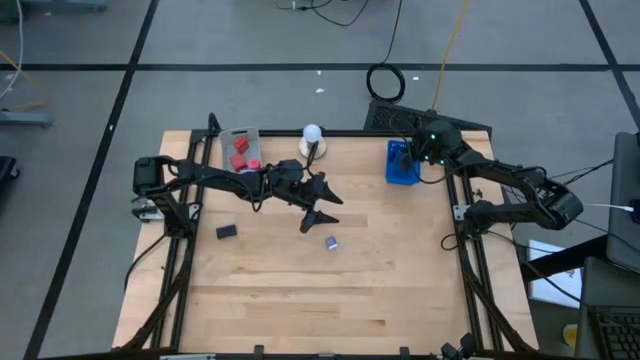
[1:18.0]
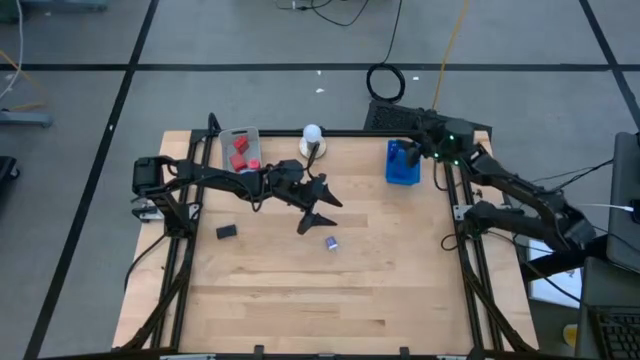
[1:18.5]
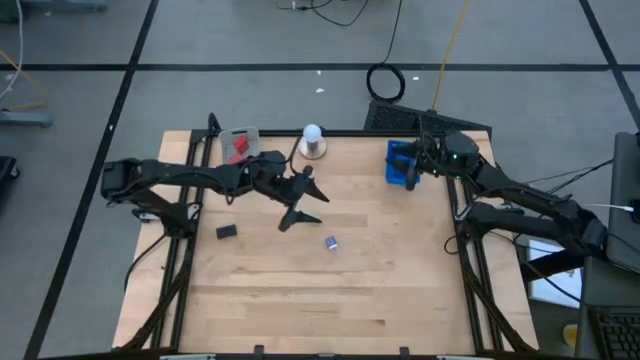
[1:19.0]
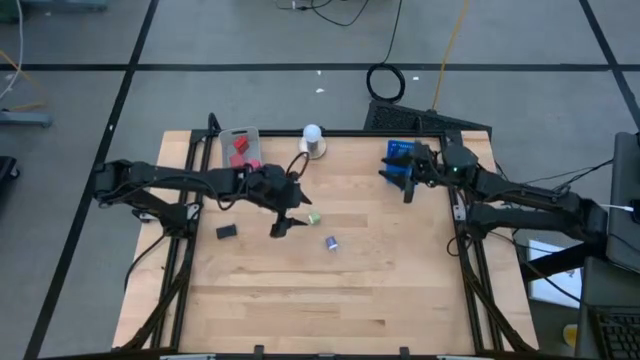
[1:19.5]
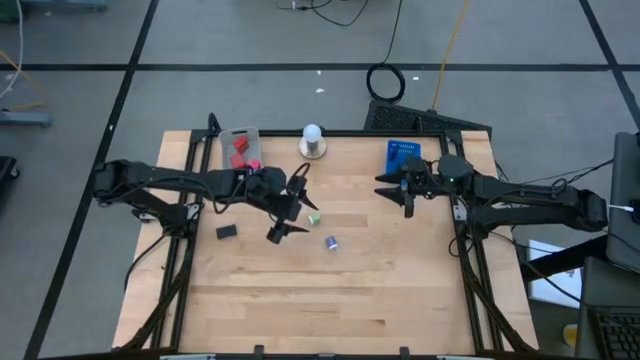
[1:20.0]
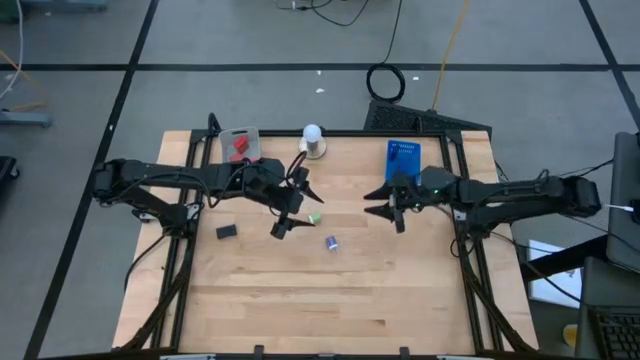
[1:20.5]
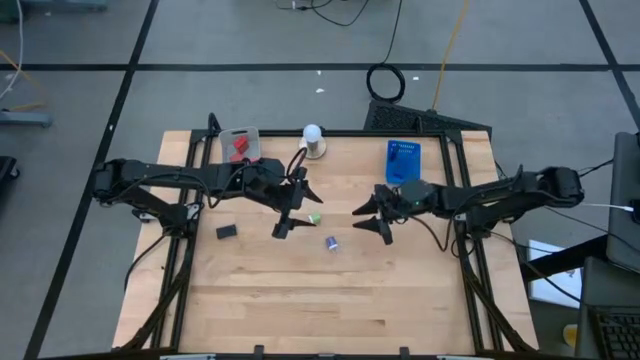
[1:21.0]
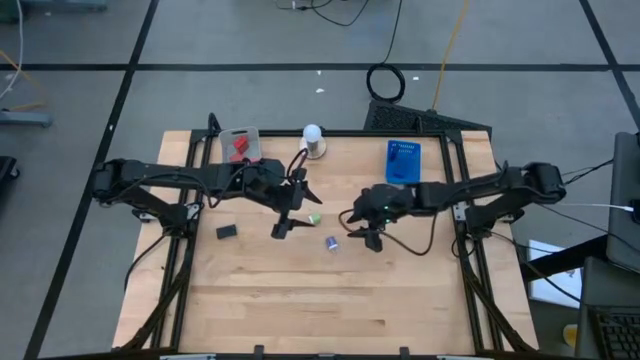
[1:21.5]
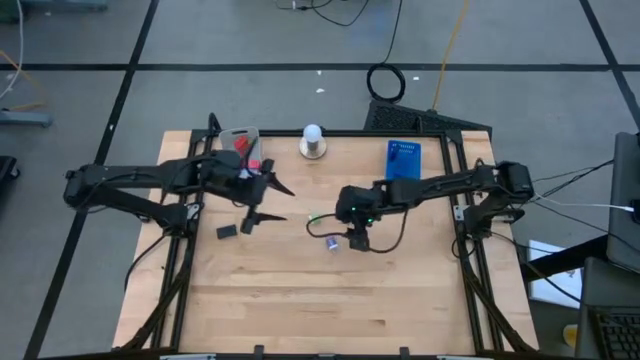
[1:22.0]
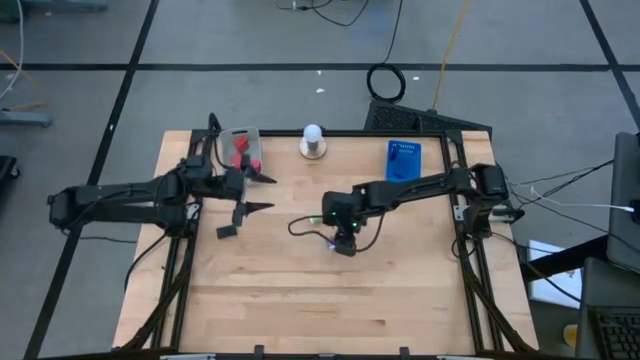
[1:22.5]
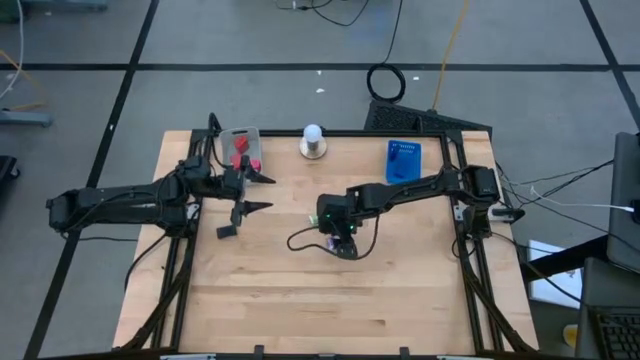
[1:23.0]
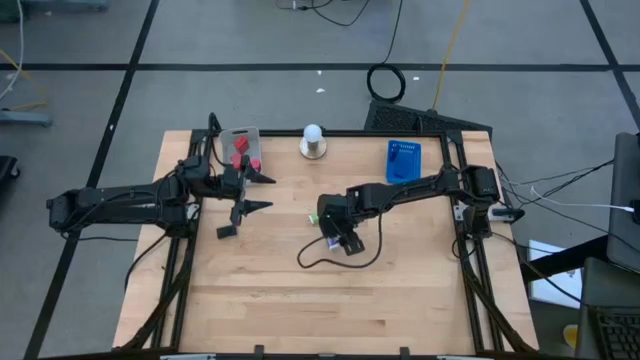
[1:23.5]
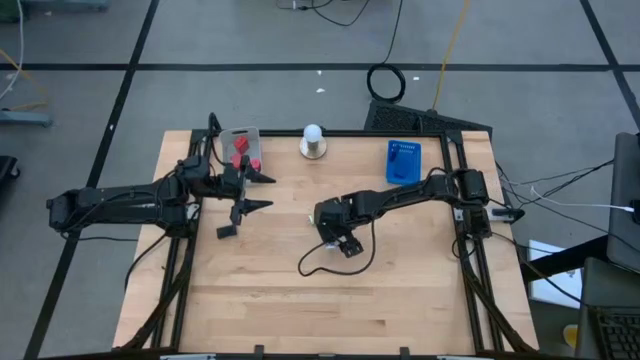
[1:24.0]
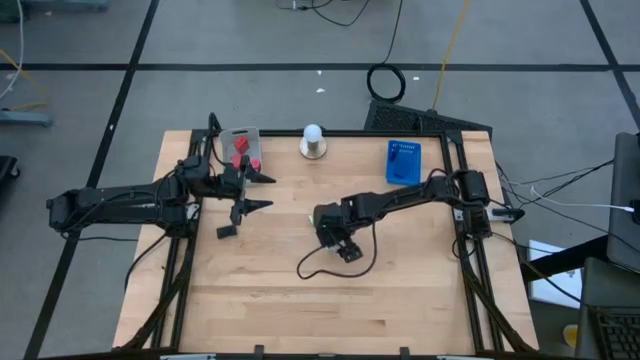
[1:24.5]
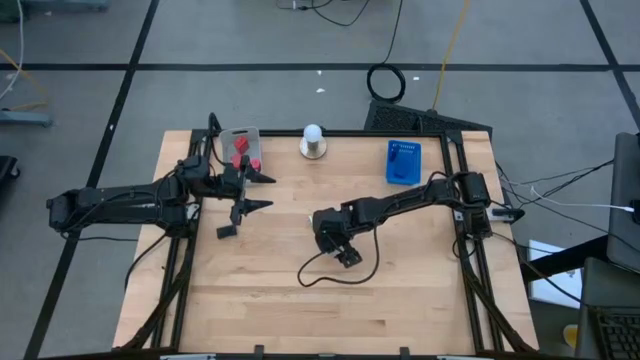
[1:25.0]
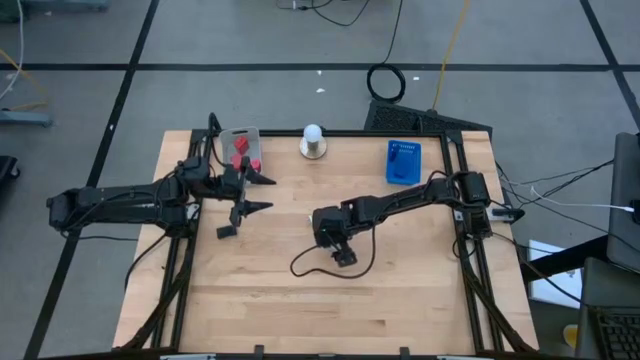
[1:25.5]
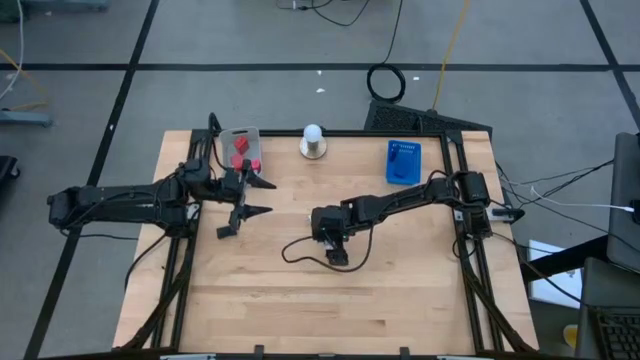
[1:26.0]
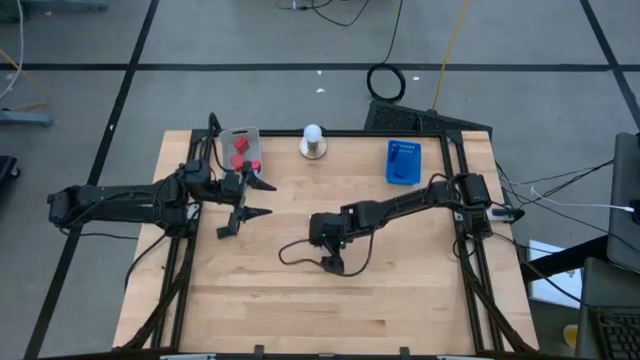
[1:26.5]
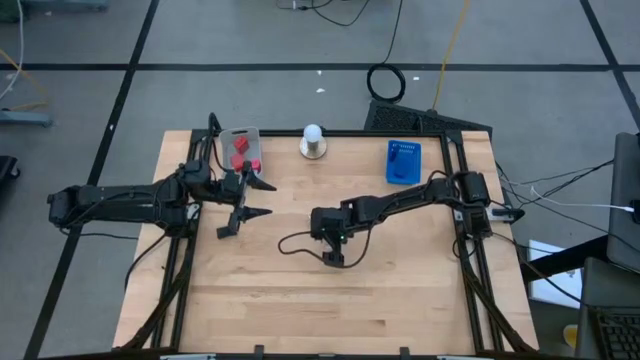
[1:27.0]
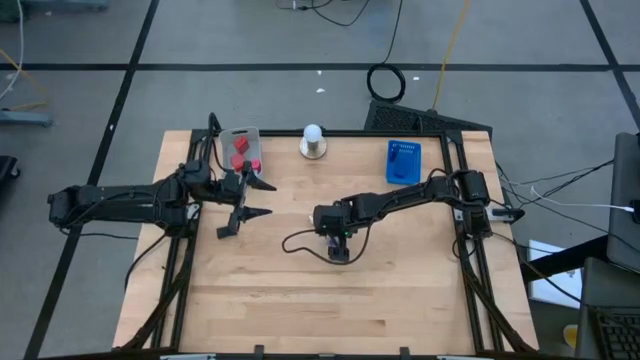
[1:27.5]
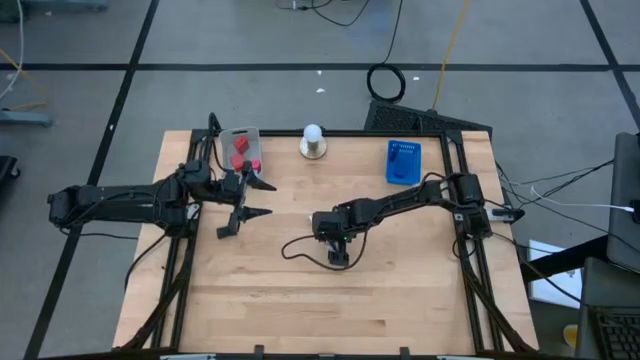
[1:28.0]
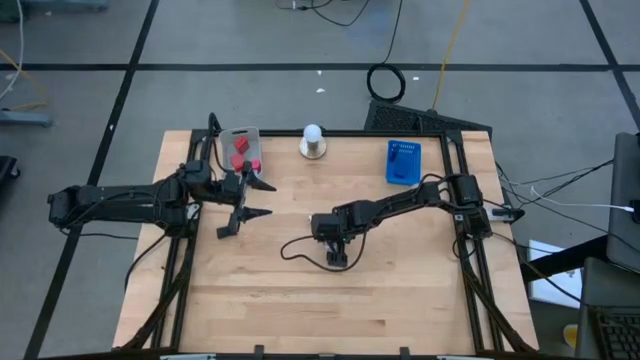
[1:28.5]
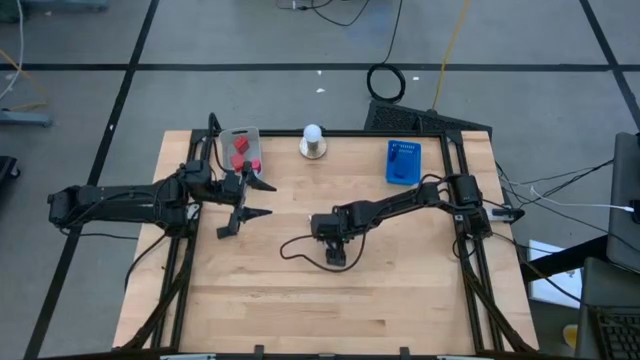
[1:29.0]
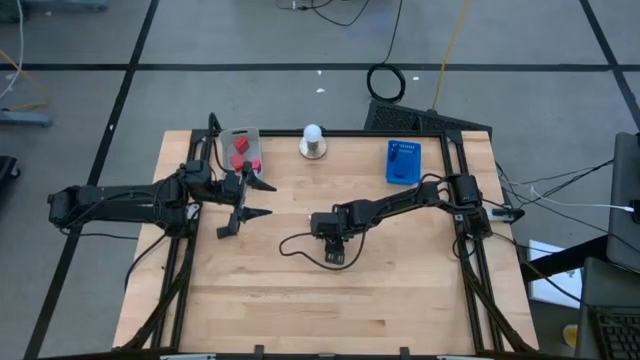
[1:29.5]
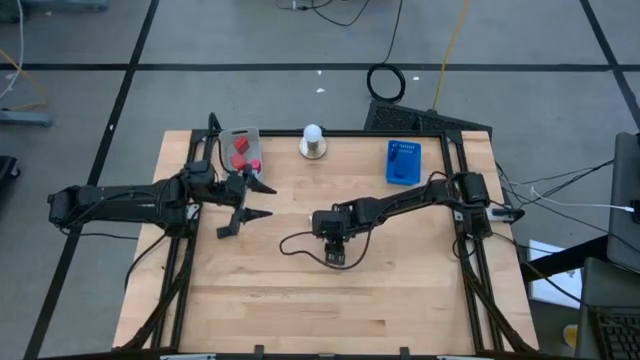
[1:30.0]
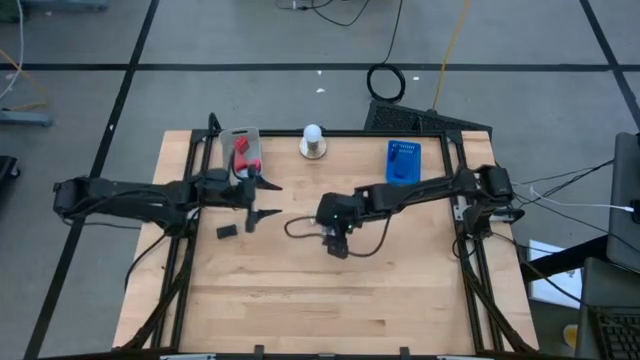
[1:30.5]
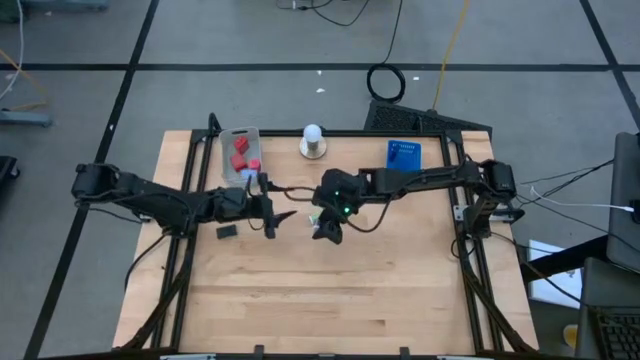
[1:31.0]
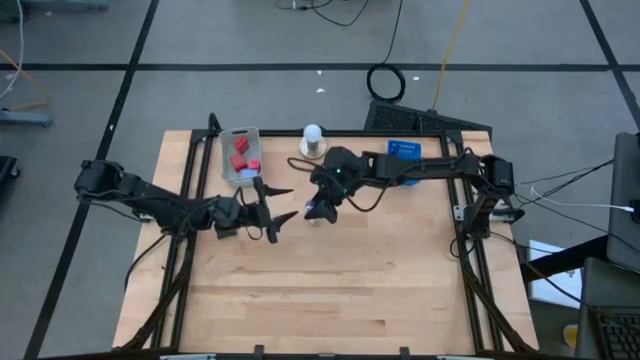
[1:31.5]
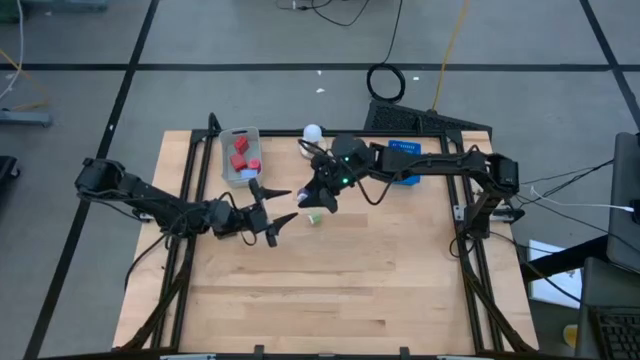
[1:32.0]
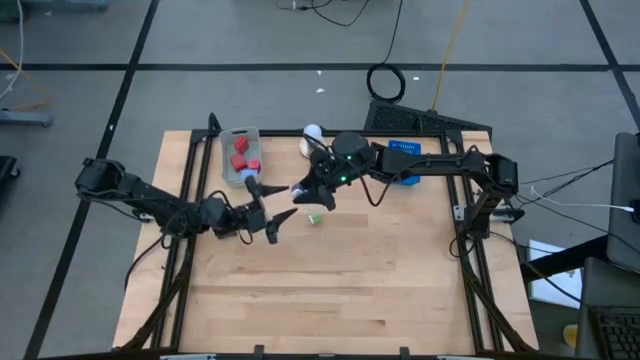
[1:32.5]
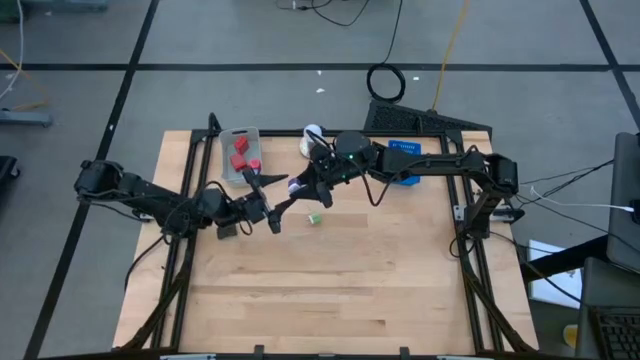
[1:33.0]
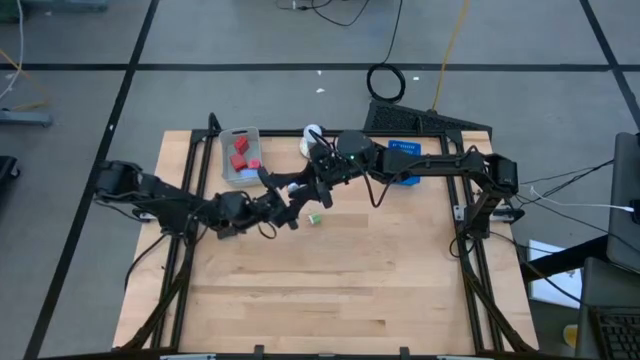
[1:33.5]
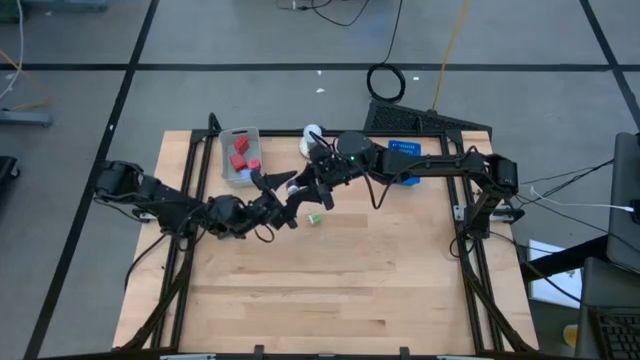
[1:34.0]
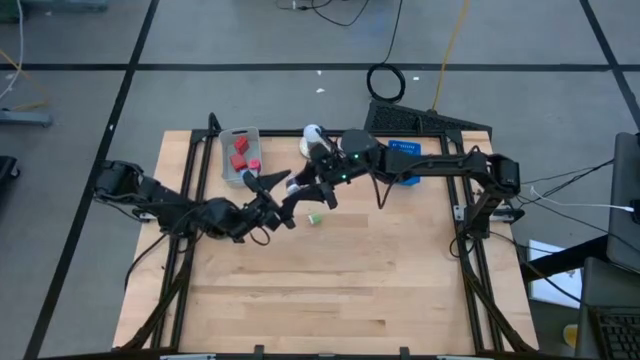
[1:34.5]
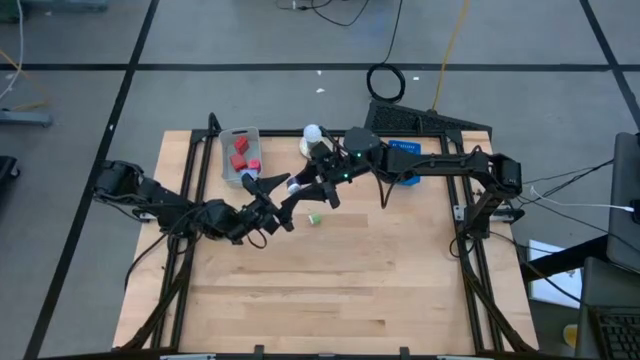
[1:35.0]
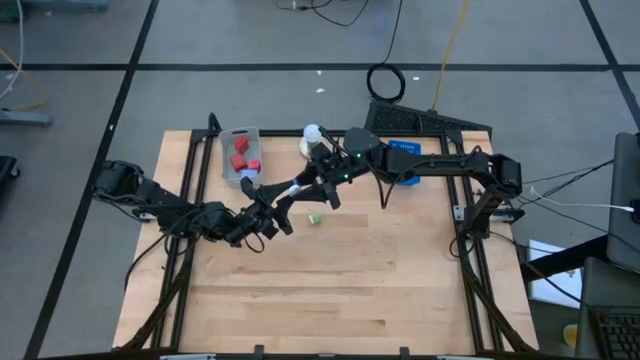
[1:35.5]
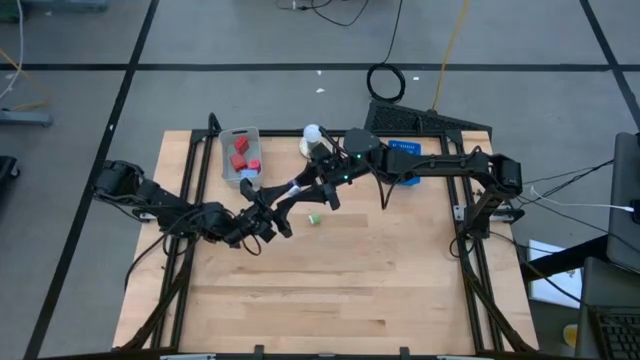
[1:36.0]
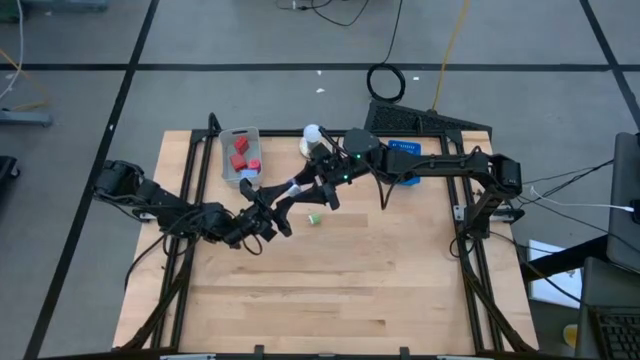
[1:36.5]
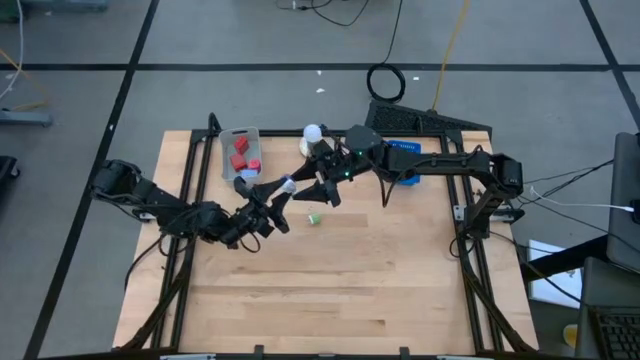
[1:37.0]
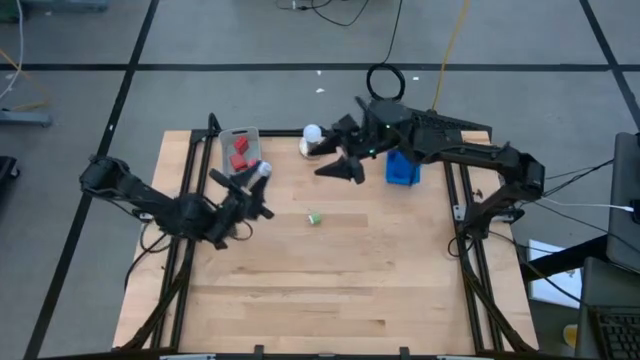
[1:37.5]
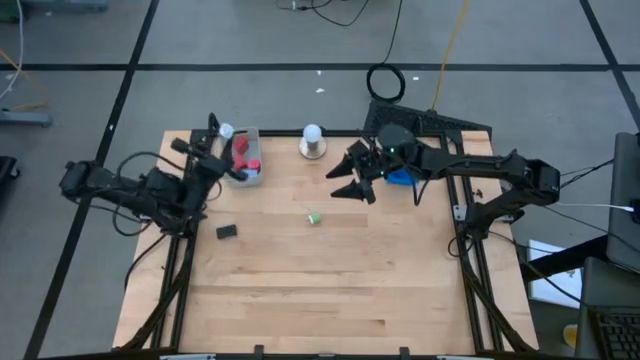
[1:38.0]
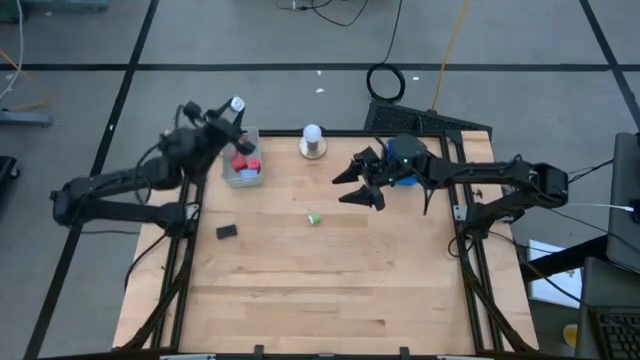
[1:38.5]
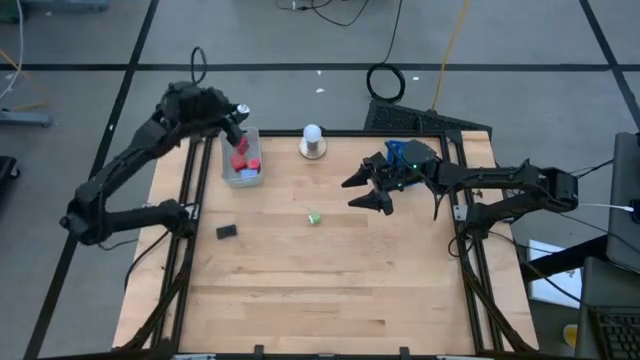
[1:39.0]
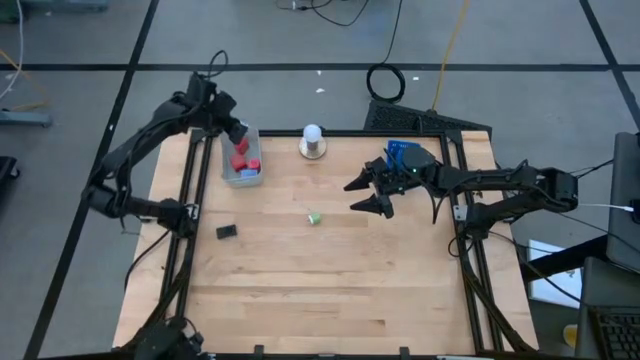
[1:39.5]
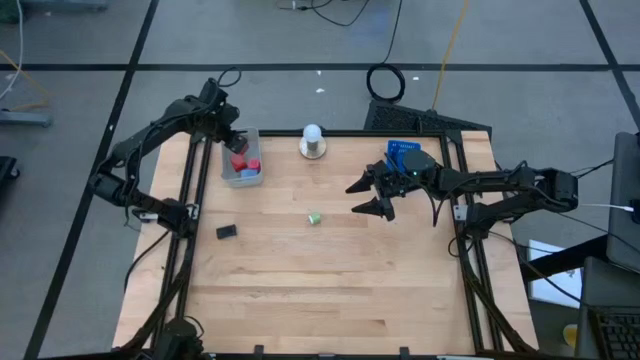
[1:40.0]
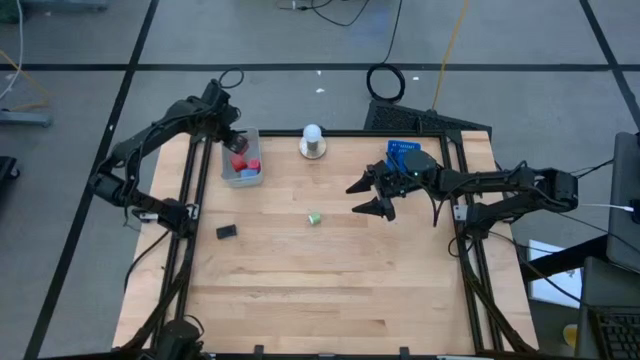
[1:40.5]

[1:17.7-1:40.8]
Task: Pick & Place Office items
Put the violet charger adapter into the gray bin
